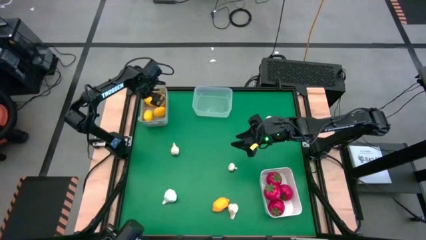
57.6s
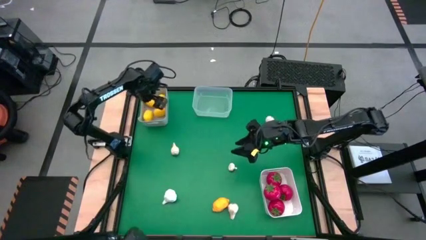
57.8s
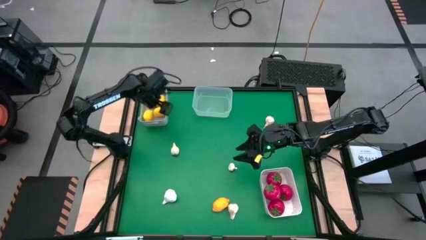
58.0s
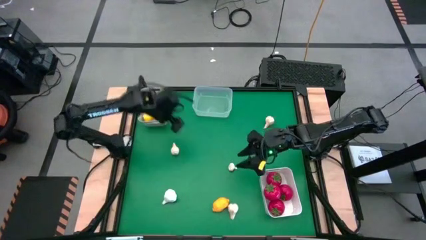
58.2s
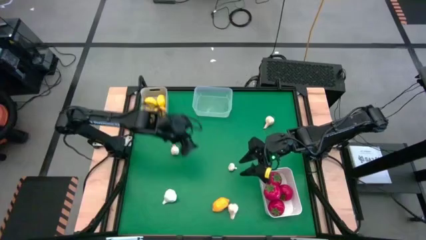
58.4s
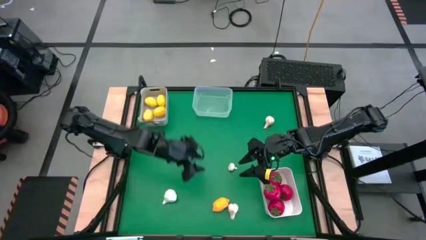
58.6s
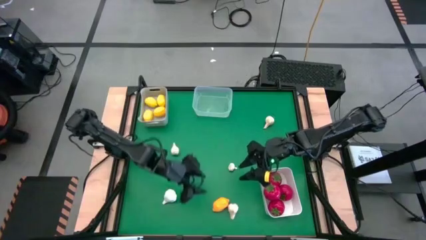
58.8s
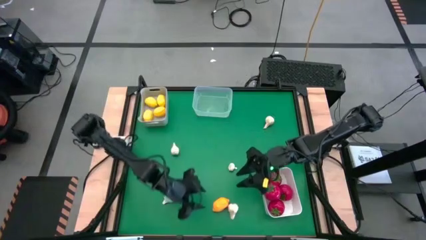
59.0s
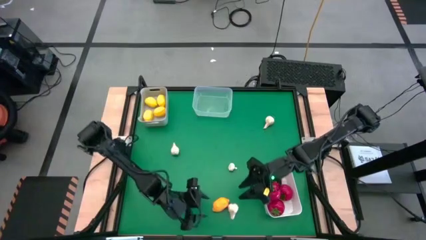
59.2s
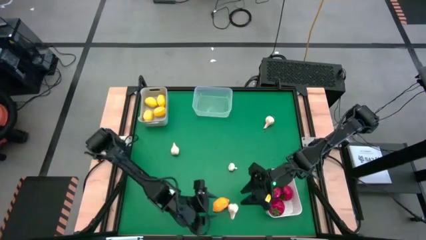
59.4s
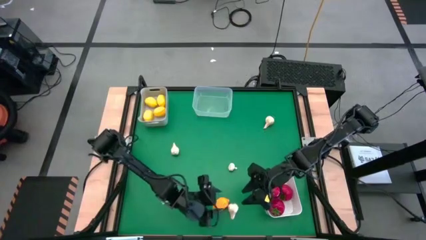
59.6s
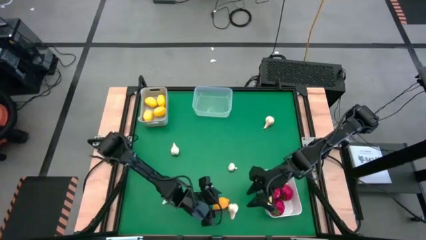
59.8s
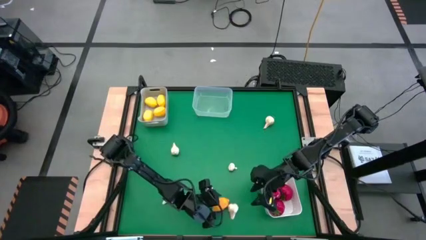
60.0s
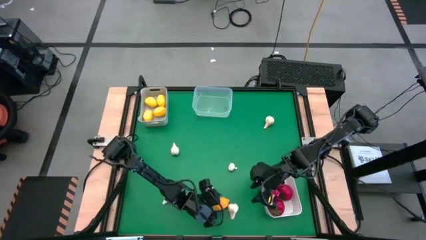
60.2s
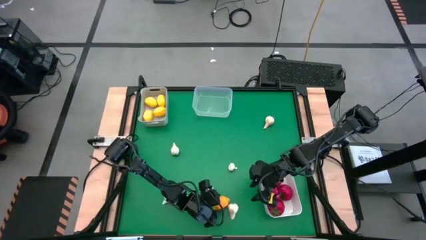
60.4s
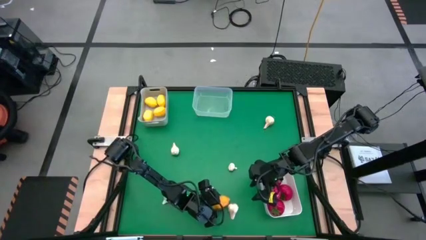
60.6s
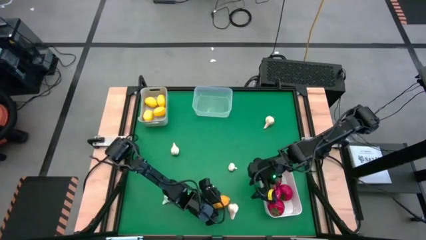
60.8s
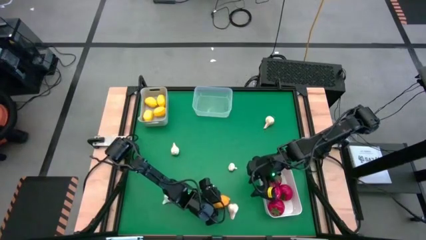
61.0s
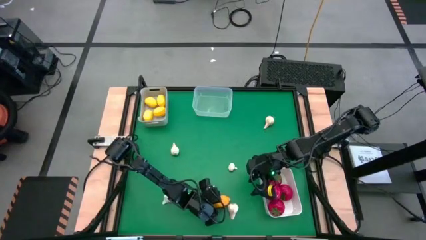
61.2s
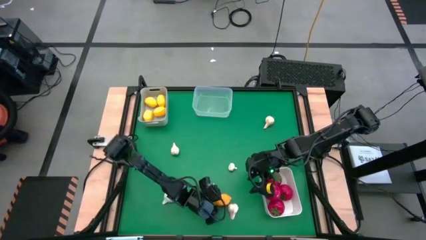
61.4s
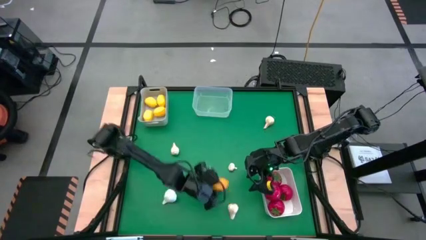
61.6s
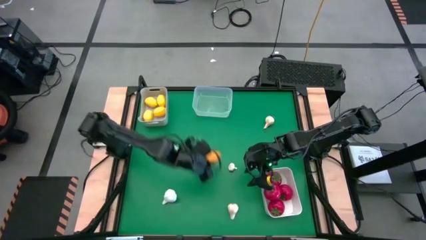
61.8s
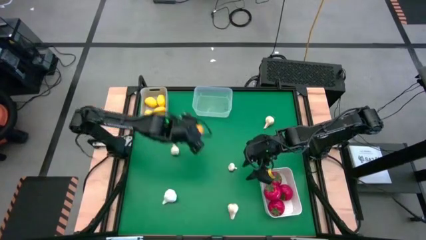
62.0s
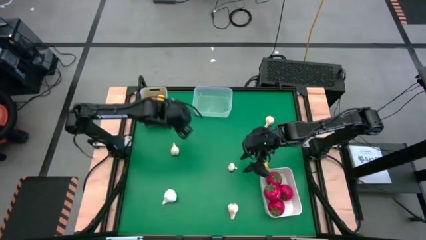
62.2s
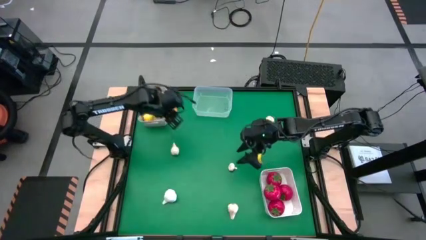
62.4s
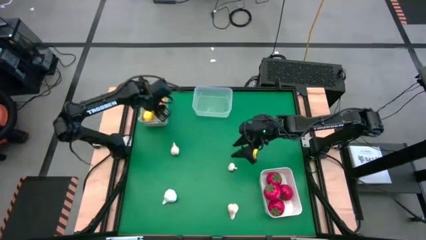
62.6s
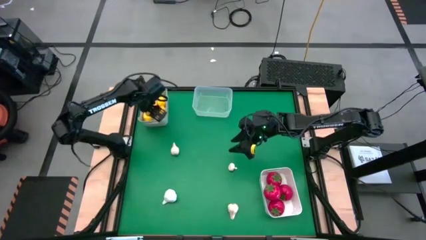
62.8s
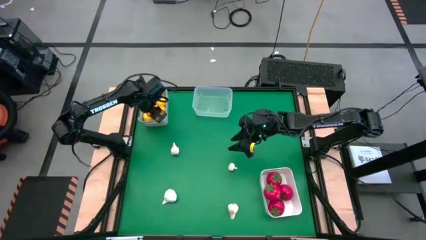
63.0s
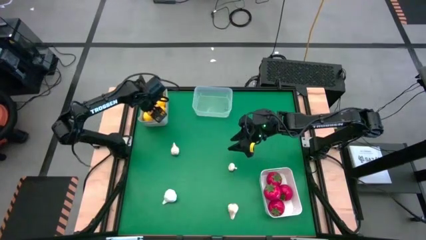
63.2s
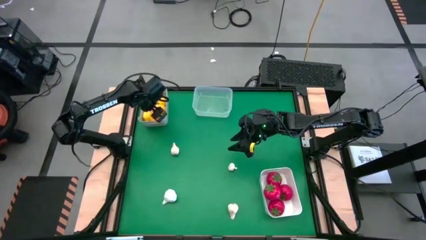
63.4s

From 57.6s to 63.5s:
Task: Sort produce into baskets
Put the yellow lemon into the gray bin

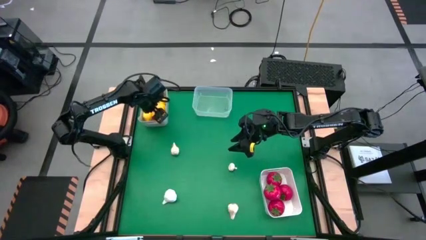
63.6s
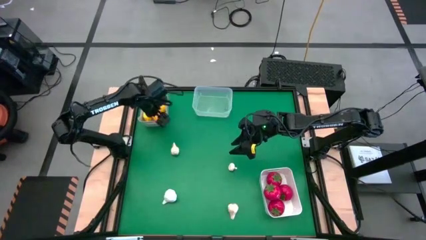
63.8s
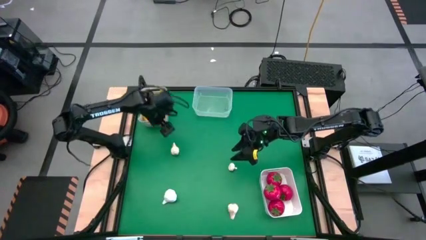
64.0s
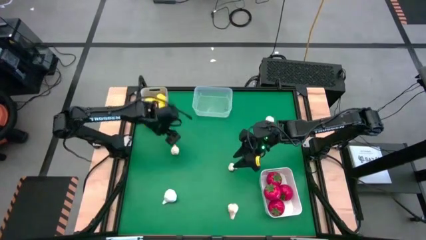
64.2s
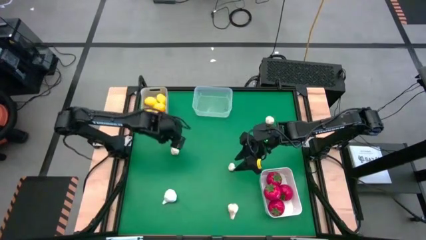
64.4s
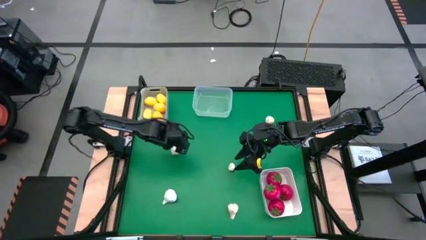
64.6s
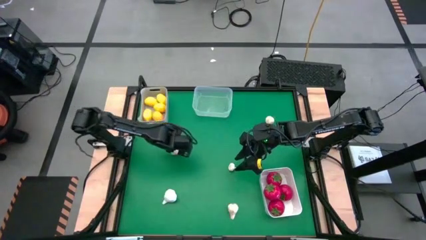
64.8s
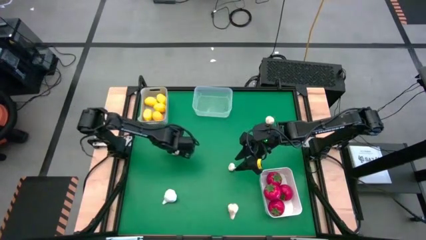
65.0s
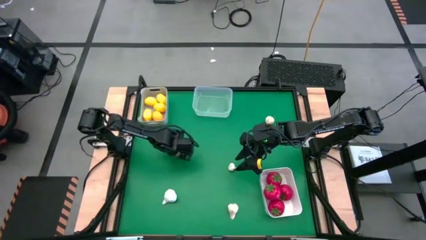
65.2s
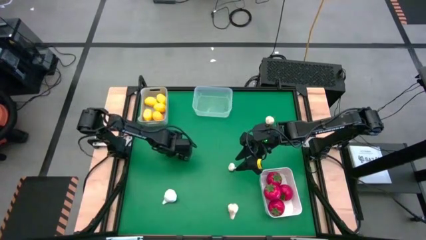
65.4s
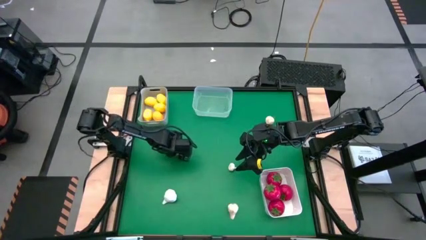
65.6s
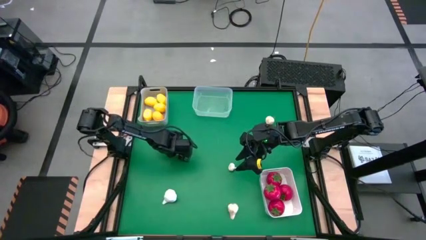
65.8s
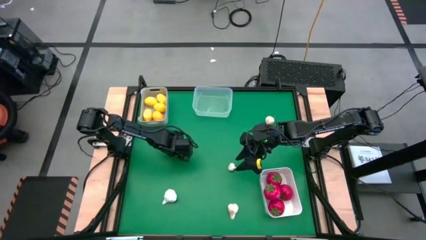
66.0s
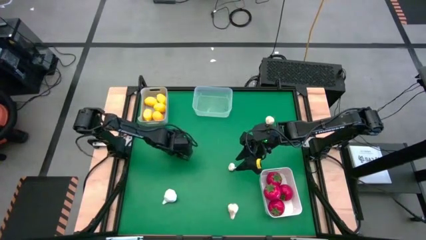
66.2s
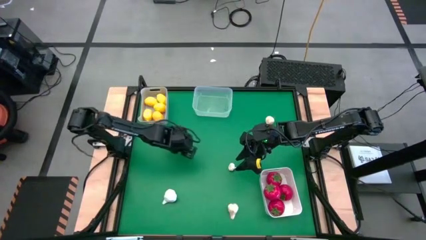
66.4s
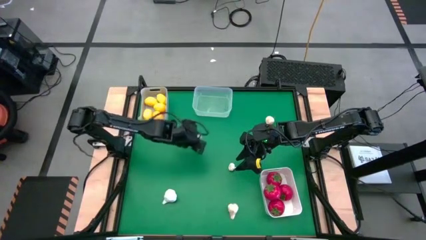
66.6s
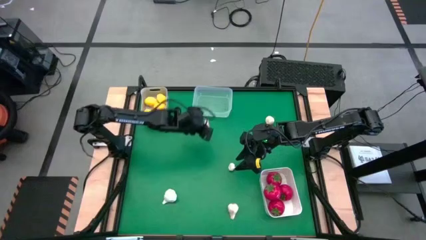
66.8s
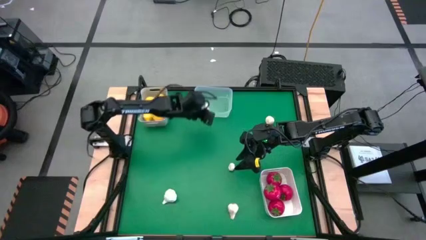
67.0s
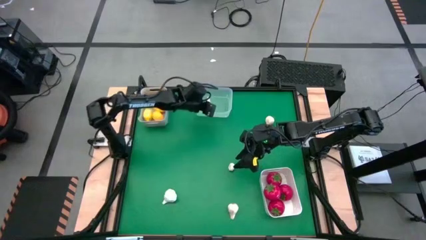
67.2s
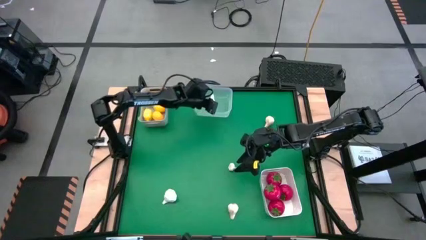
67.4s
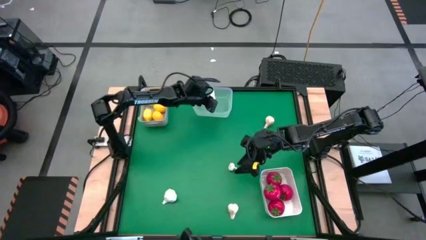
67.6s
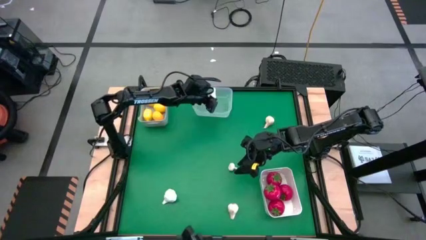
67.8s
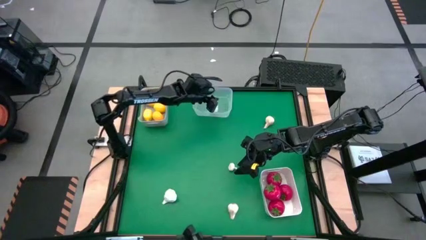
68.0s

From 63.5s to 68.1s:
Put the garlic into the transparent bin

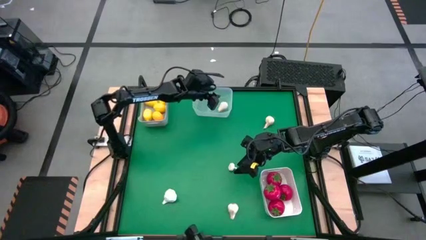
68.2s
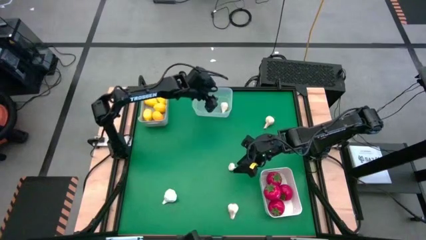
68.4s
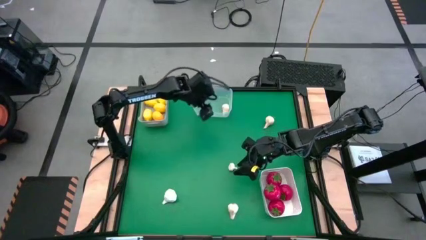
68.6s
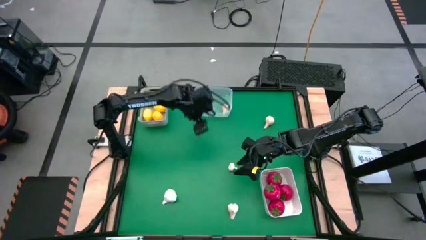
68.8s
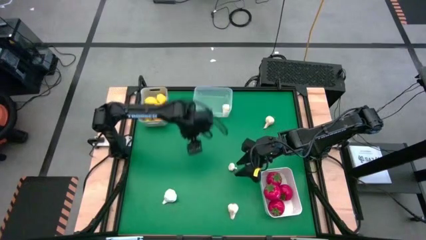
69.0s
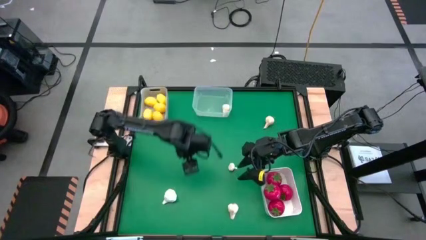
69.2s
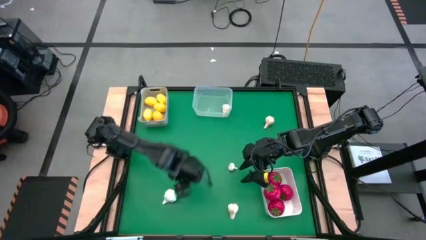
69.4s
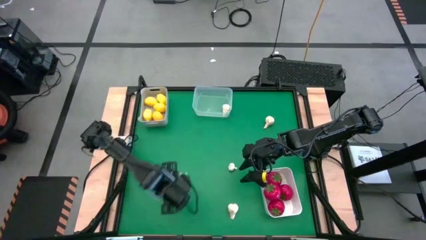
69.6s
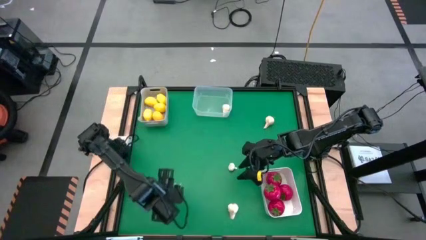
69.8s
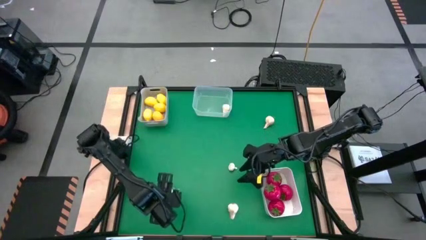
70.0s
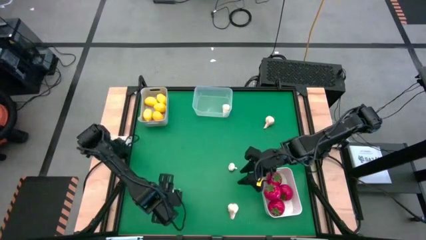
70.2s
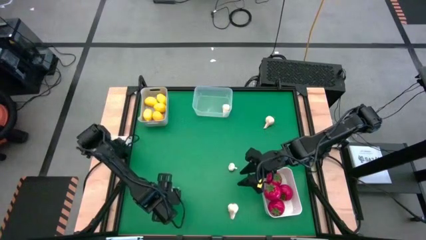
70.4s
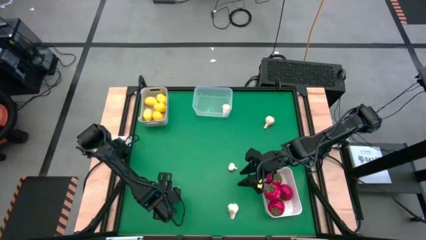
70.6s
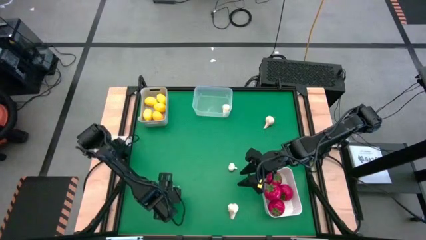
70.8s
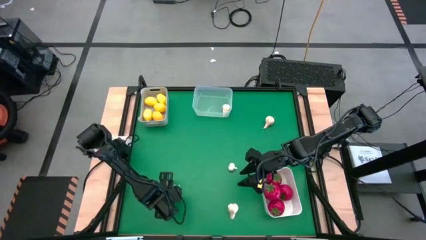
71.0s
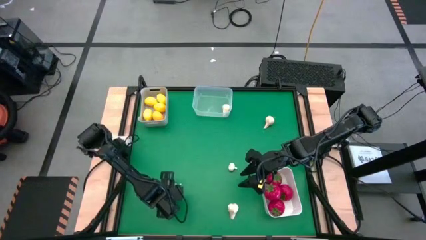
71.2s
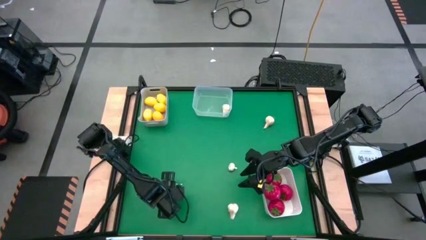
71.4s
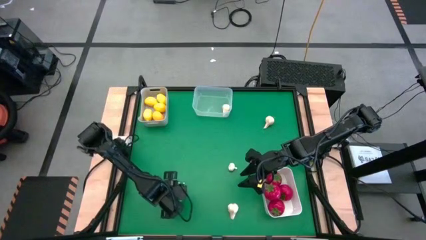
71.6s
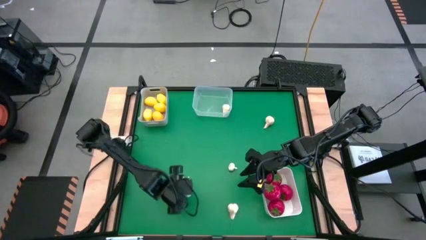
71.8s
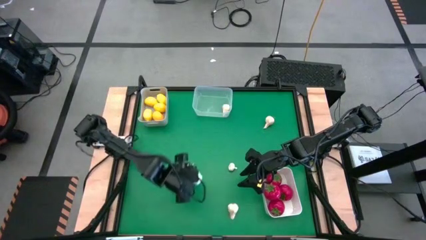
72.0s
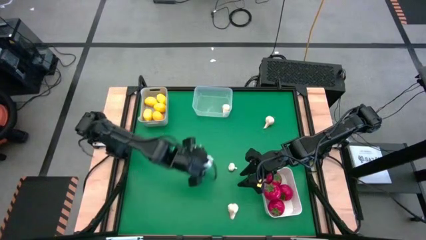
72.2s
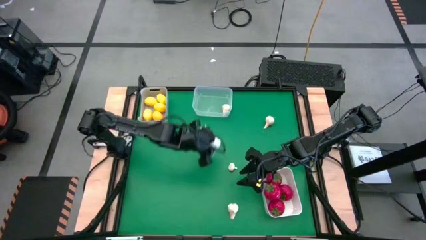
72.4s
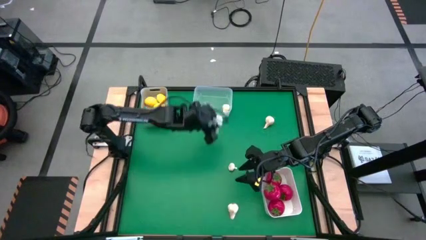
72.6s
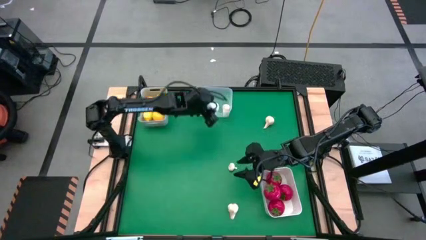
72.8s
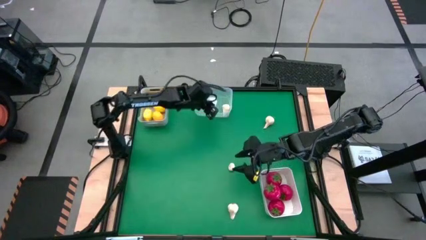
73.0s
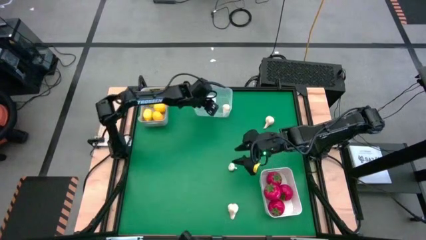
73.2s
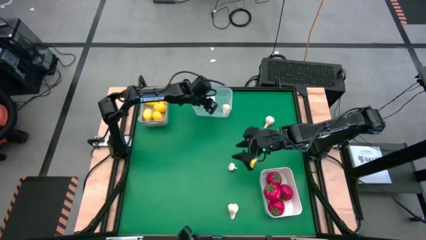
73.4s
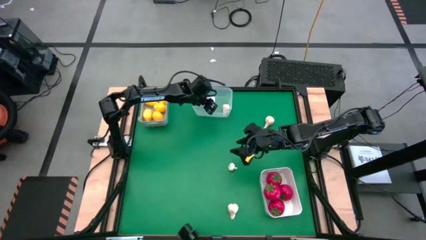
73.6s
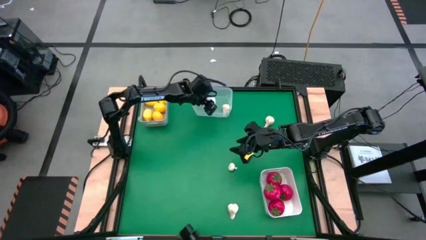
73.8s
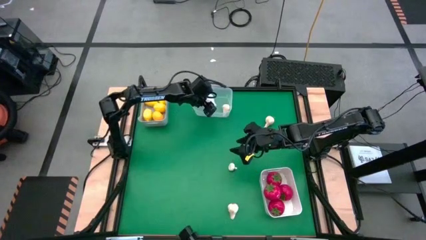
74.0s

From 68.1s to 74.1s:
Put the garlic into the transparent bin
